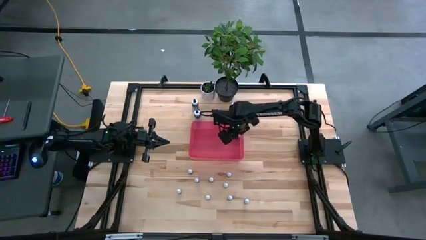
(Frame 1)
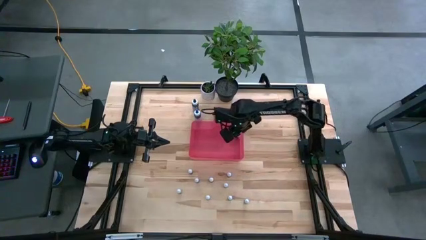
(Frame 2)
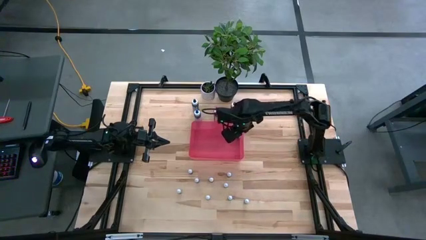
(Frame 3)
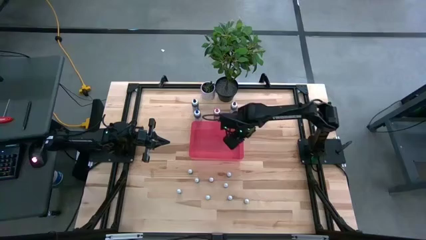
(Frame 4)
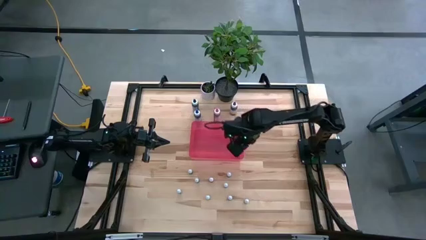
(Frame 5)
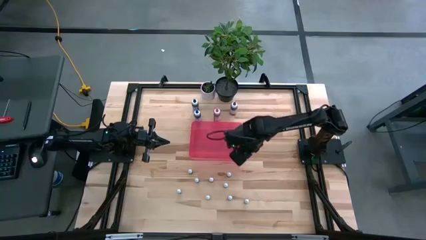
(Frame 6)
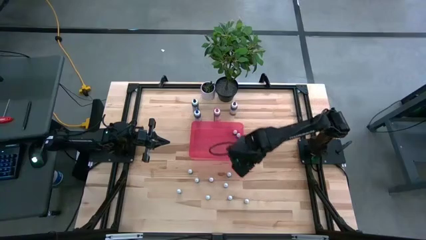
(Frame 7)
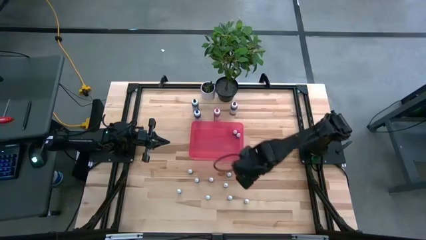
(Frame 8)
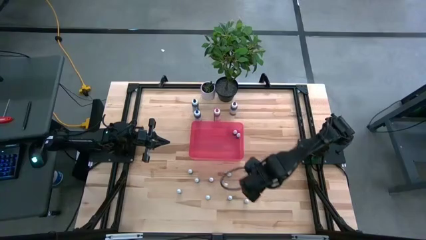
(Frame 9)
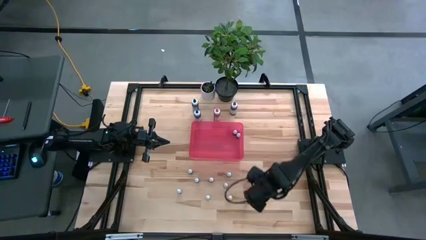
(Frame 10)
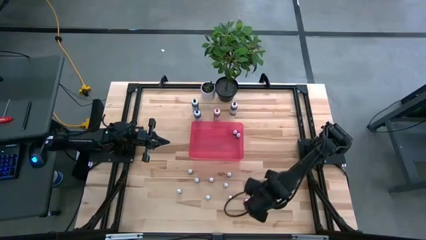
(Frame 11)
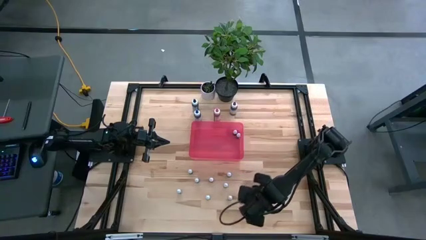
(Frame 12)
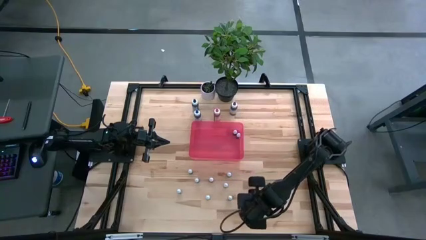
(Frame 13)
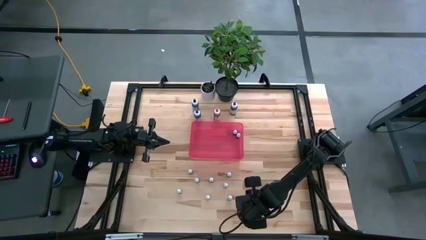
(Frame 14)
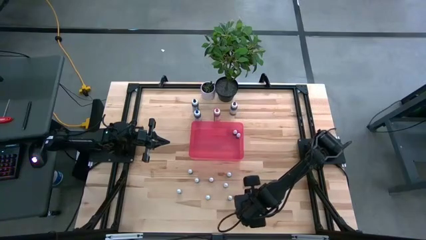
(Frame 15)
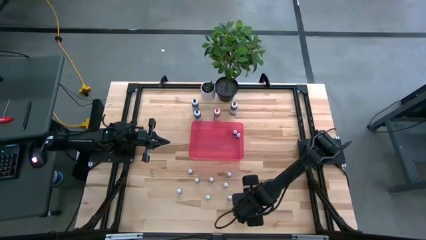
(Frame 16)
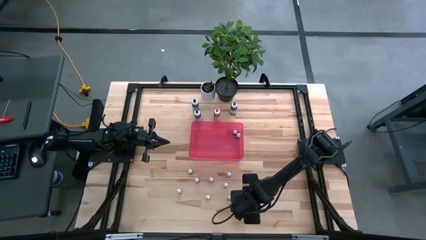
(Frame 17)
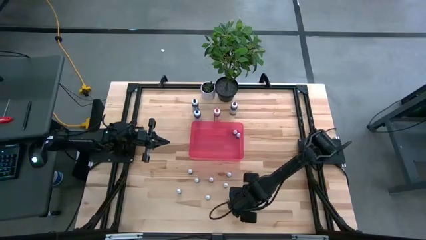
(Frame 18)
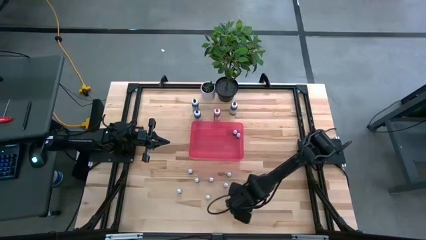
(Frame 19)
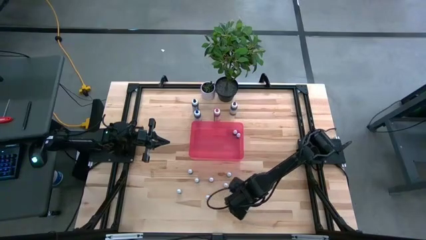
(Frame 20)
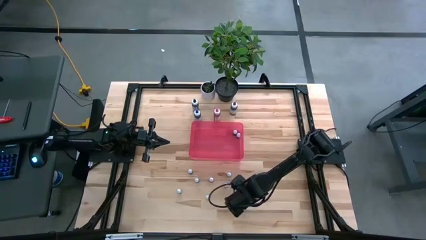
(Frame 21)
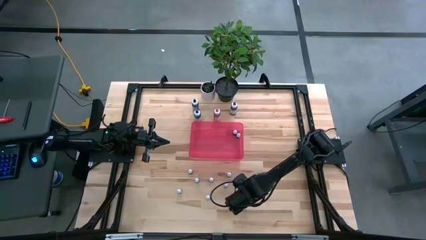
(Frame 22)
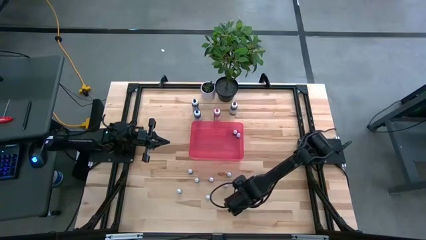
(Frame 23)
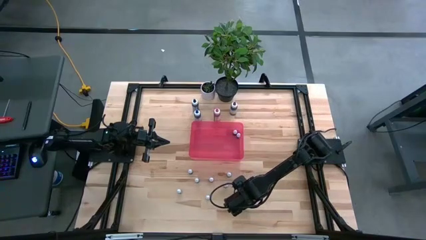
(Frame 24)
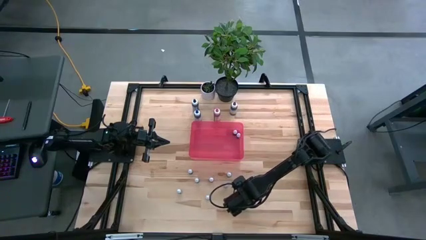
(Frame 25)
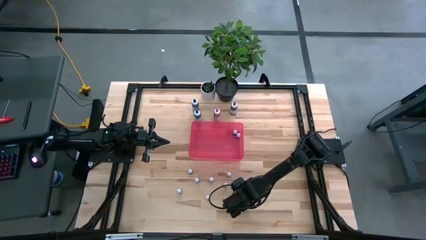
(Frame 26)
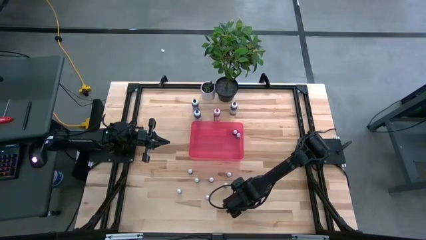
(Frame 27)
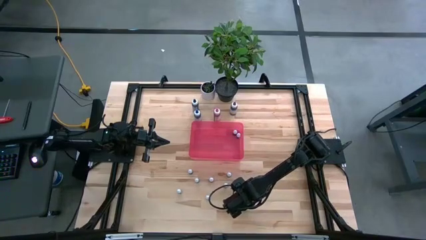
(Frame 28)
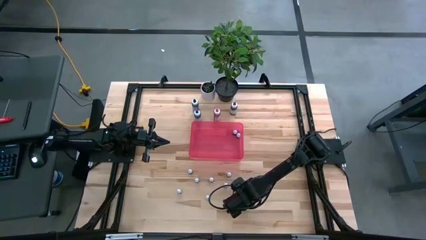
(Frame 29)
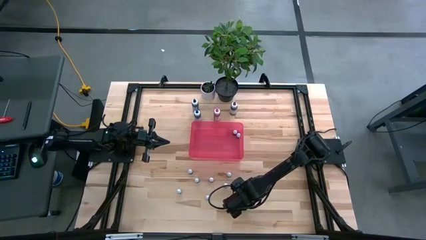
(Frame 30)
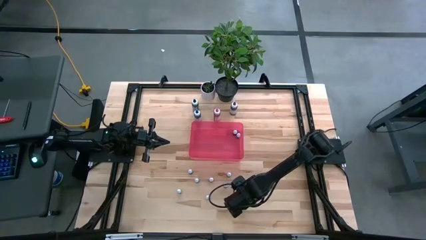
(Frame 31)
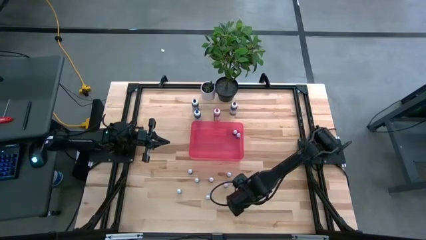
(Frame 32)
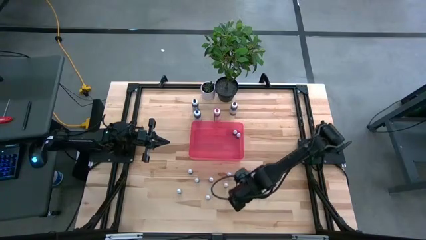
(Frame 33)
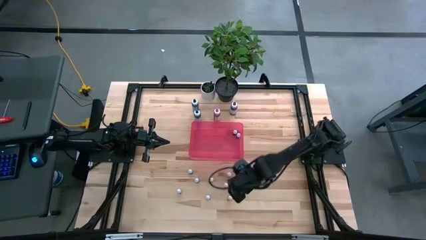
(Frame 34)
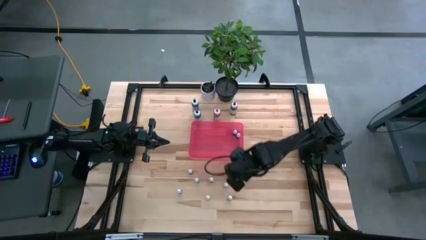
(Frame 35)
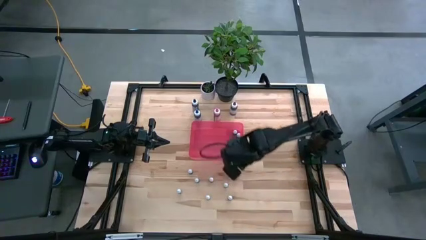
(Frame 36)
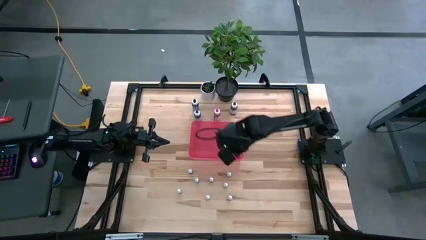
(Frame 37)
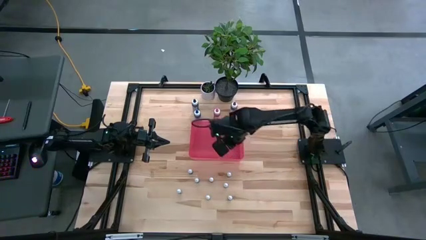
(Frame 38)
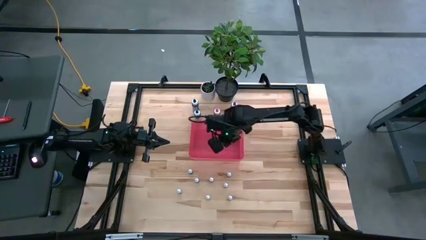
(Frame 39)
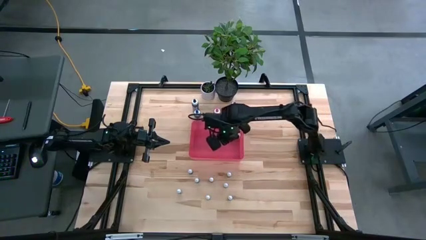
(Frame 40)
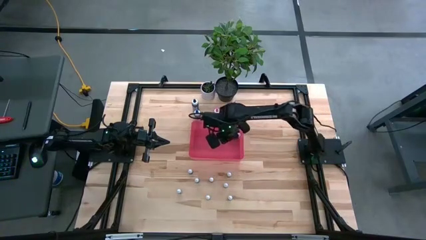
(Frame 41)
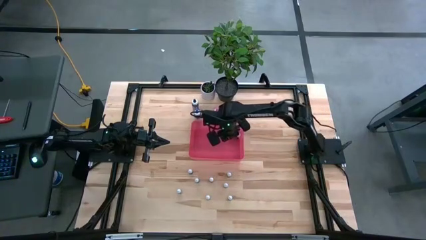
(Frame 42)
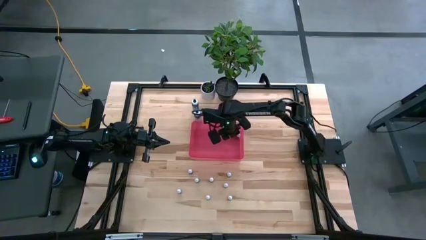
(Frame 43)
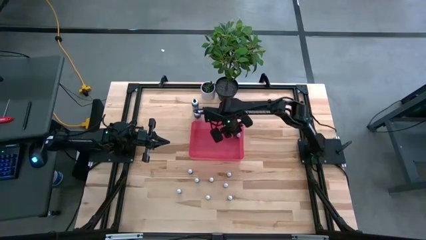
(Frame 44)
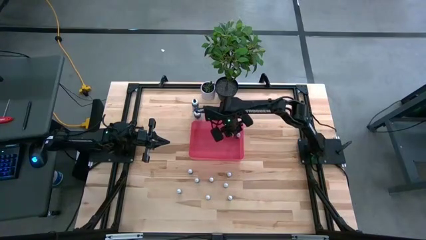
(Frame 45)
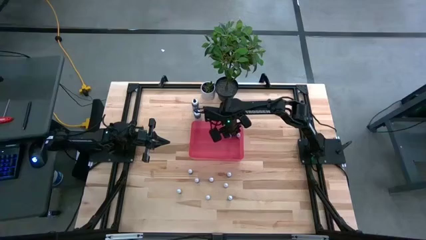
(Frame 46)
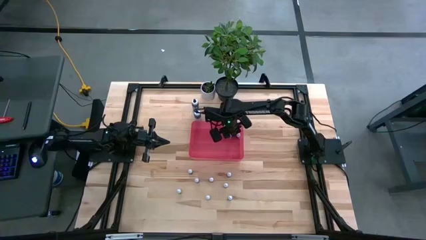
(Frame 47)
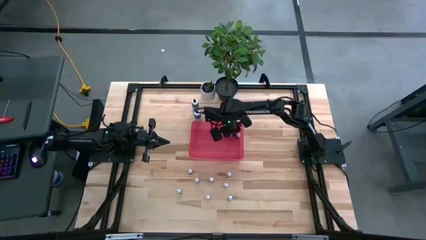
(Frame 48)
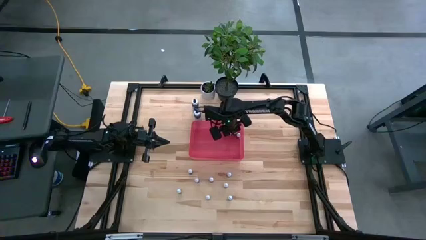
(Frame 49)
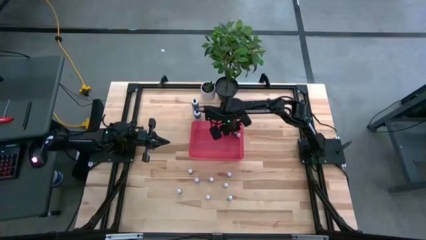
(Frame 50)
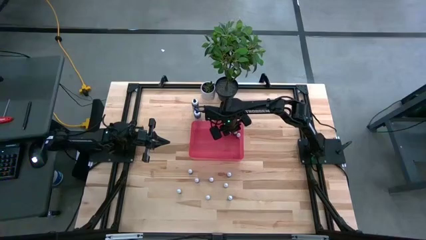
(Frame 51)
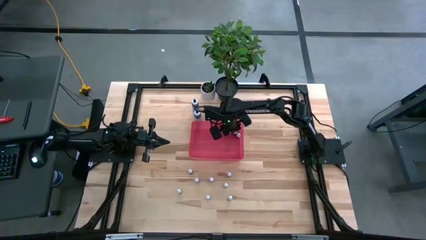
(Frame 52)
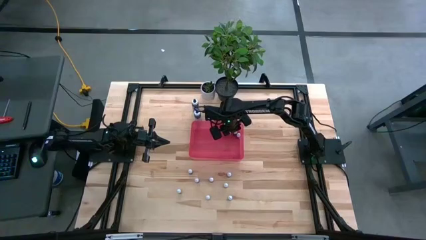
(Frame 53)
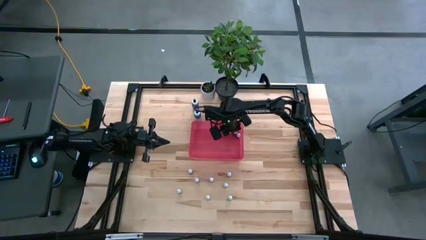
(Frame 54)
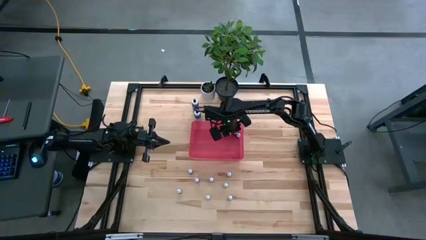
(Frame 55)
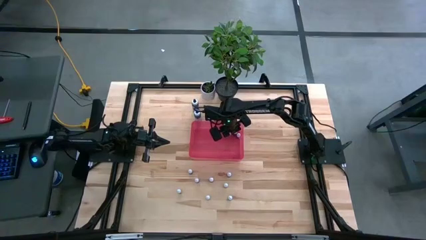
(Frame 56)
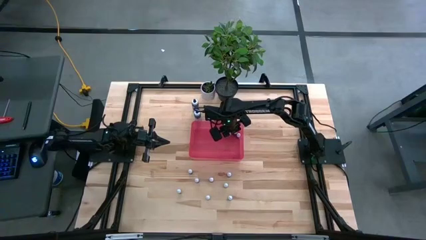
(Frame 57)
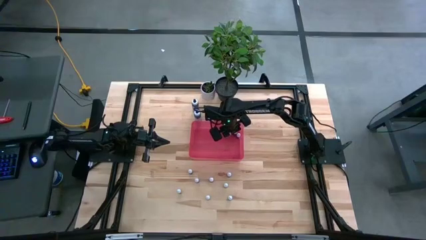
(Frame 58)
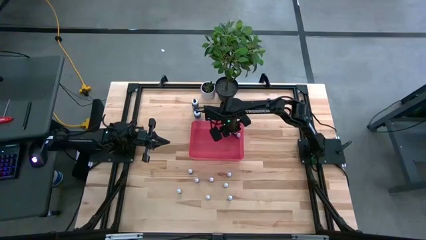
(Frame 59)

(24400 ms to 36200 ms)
Task: Pick & Place food coloring
Put the small purple food coloring bottle into the pink container
